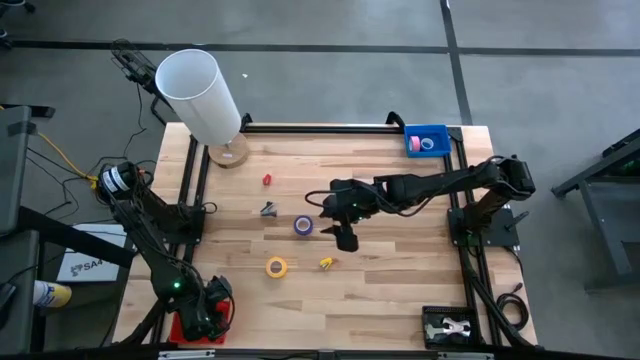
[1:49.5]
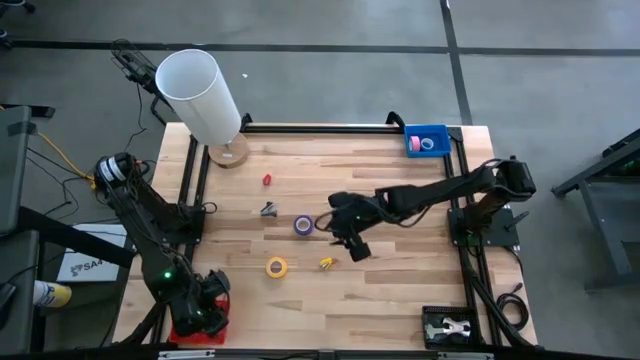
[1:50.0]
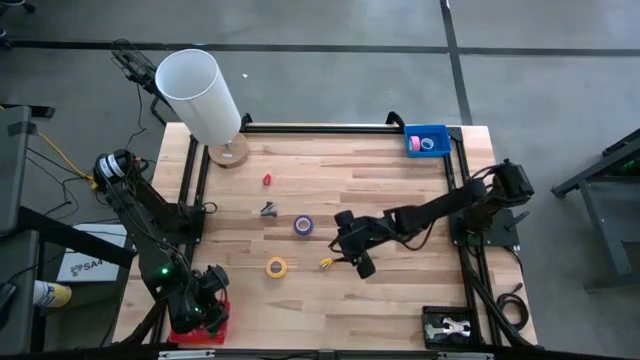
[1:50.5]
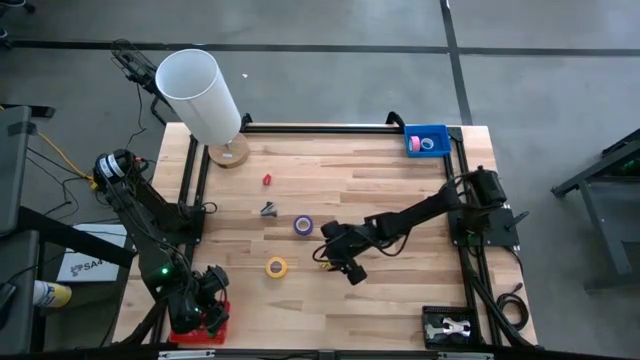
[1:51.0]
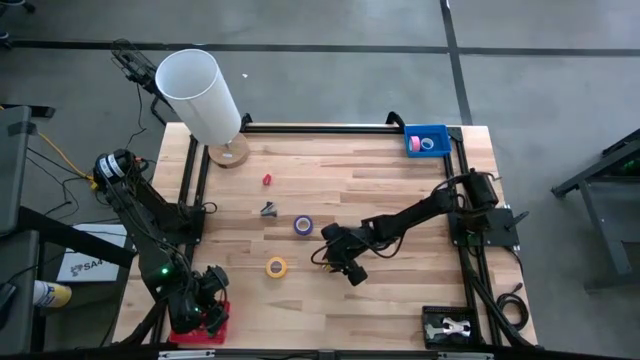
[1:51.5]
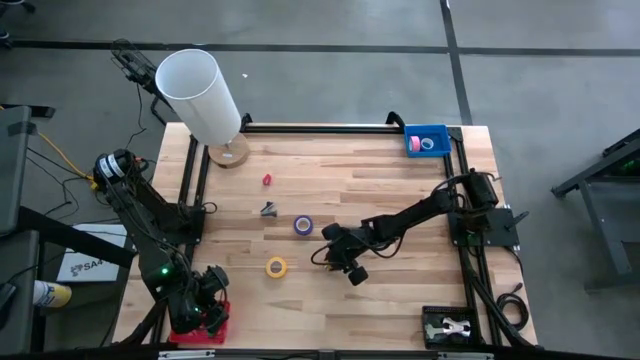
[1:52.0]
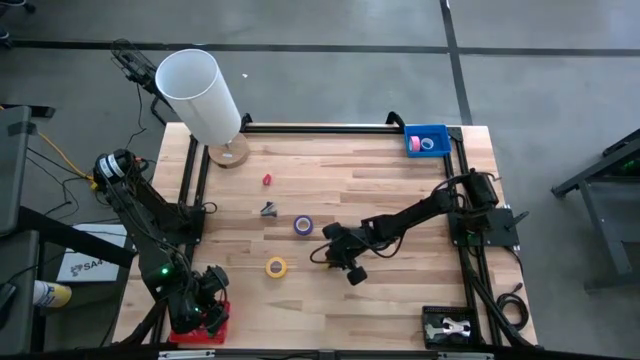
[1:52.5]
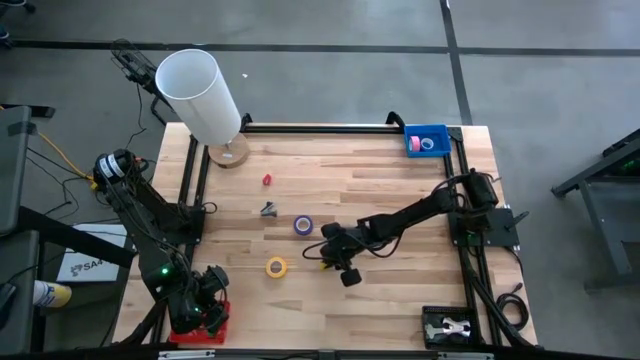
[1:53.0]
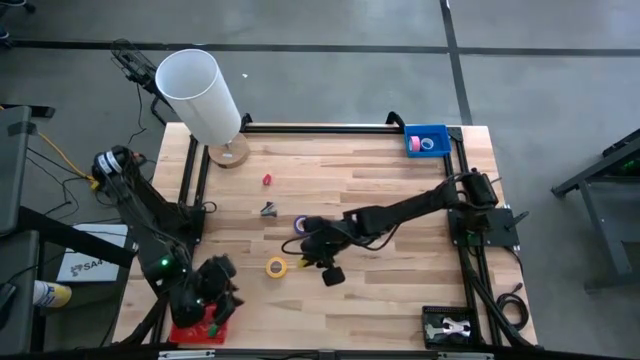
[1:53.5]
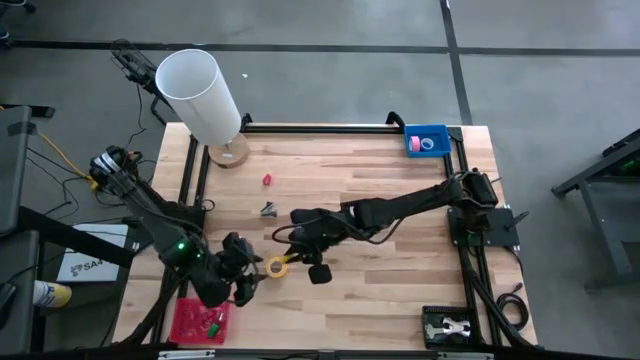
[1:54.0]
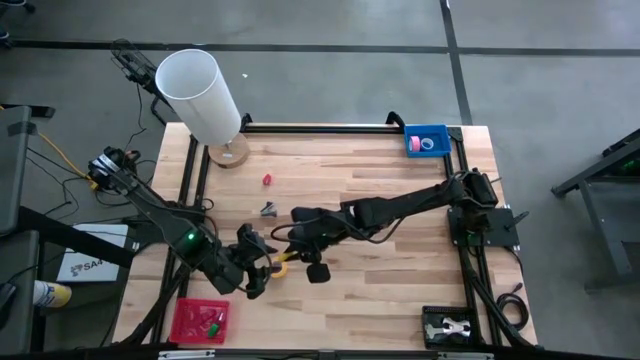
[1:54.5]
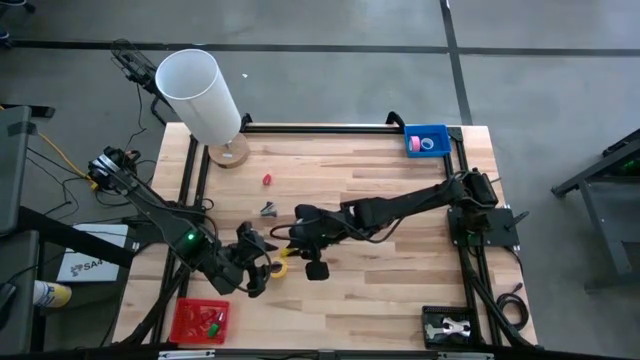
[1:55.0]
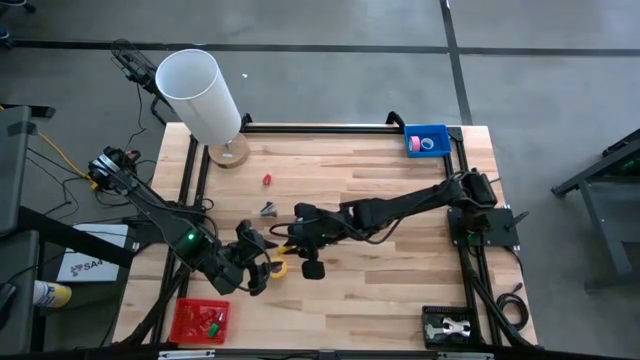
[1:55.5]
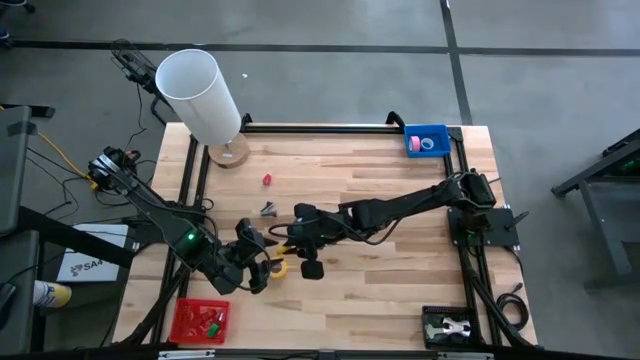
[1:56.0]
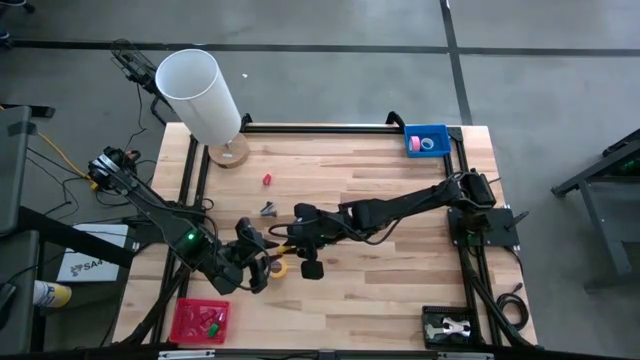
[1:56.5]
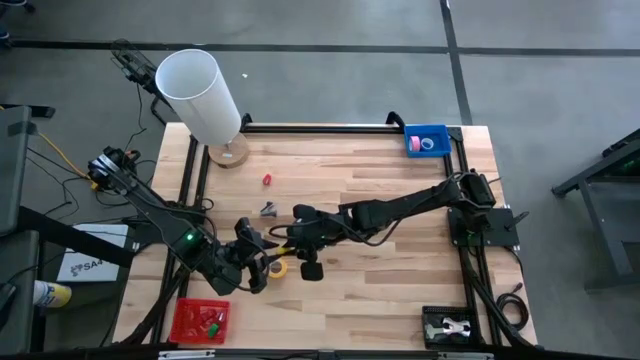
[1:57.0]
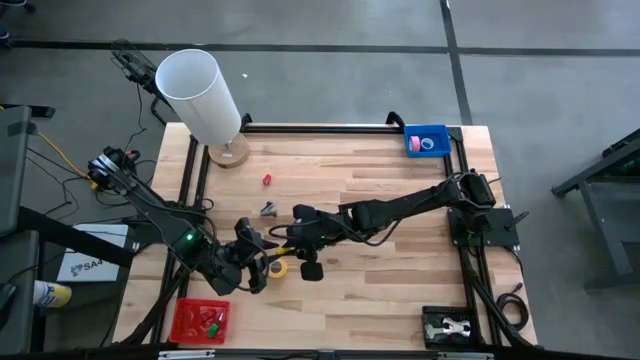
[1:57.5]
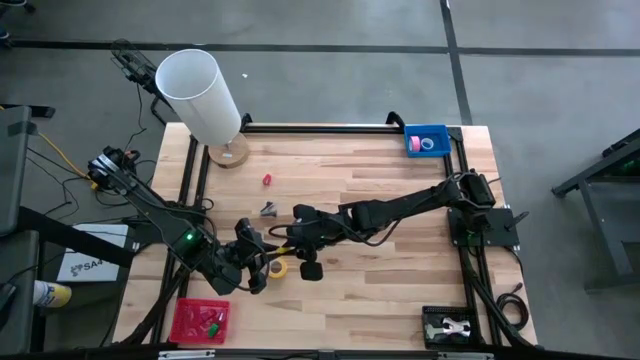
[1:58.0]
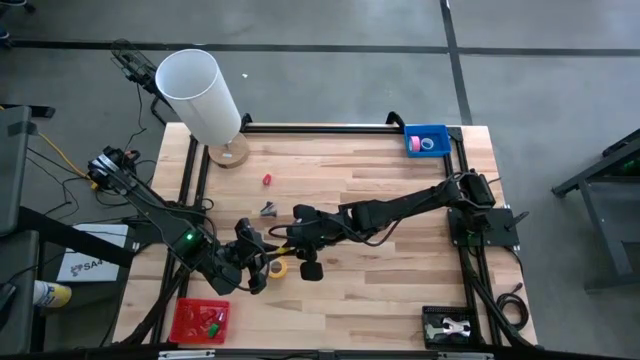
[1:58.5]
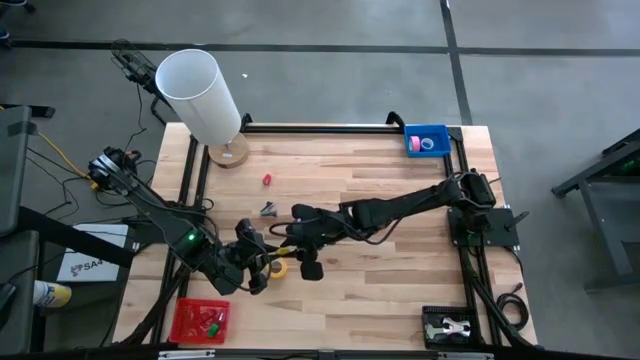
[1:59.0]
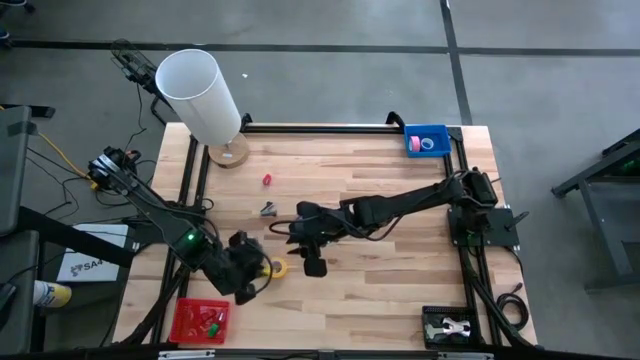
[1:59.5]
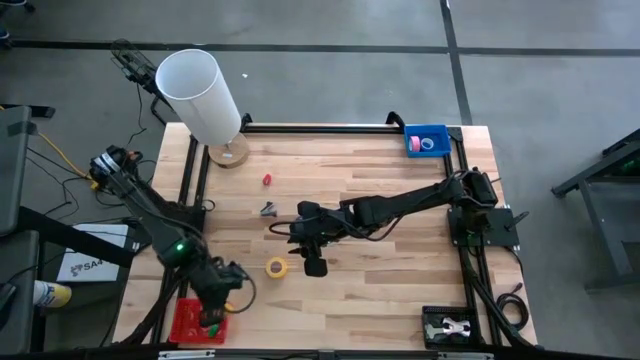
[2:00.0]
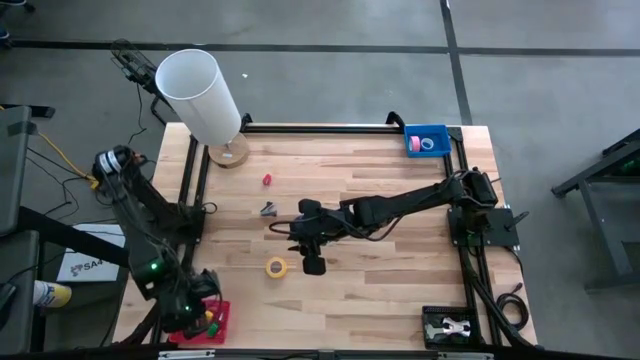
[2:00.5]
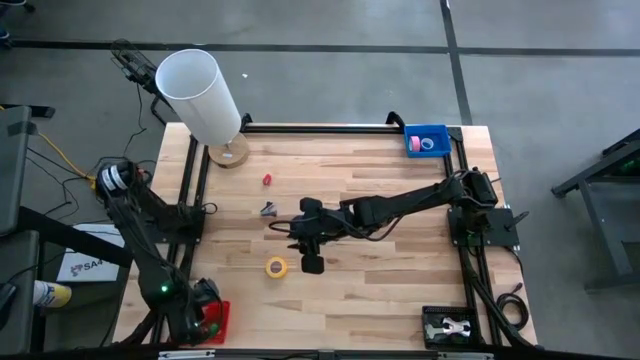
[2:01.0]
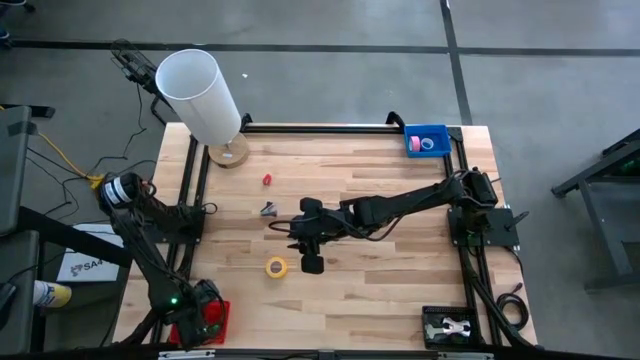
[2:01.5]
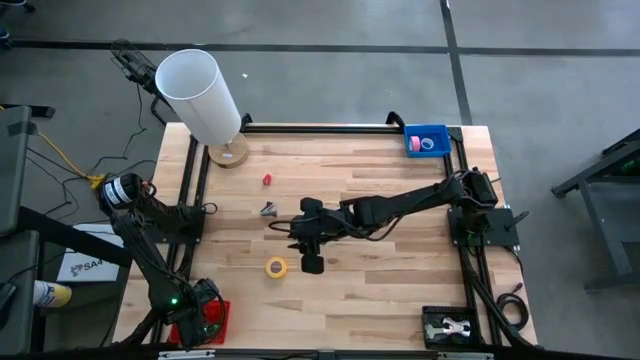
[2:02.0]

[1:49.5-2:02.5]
Task: Pick and place Stapler, Stapler remover, tape
Put the yellow stapler into the red bin

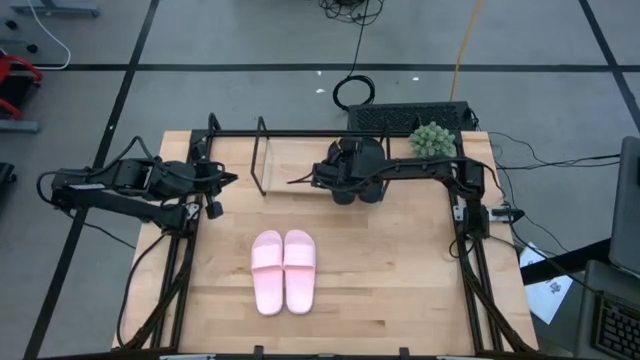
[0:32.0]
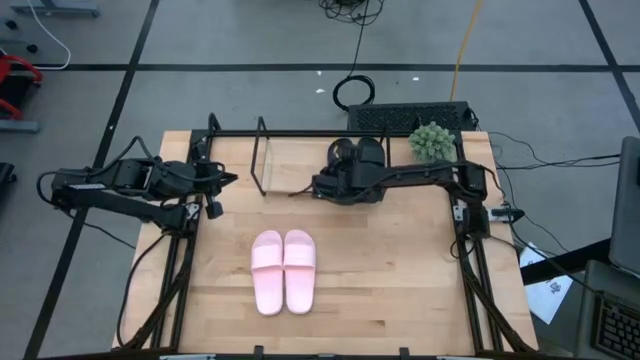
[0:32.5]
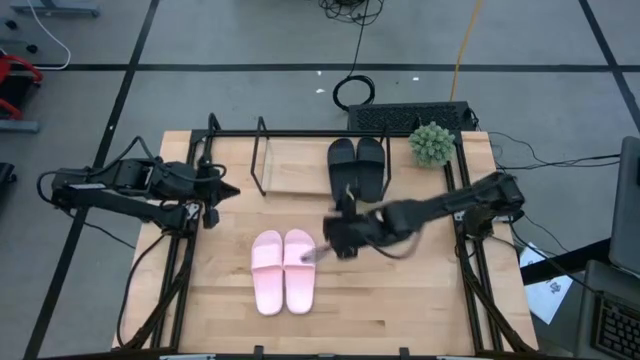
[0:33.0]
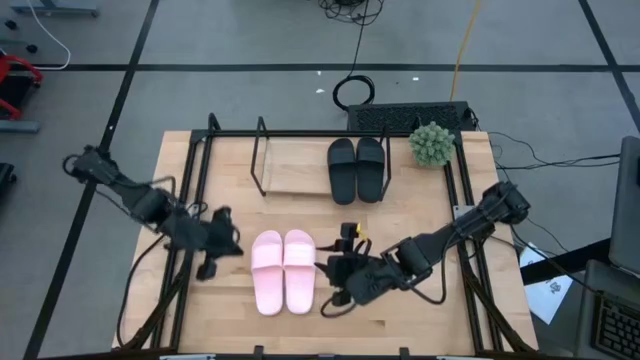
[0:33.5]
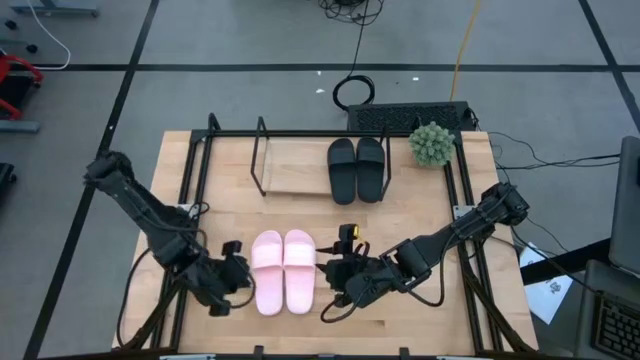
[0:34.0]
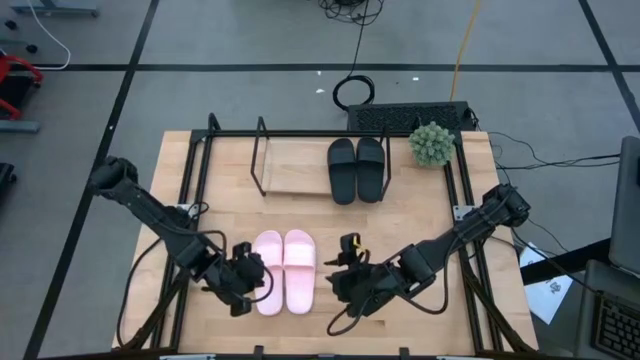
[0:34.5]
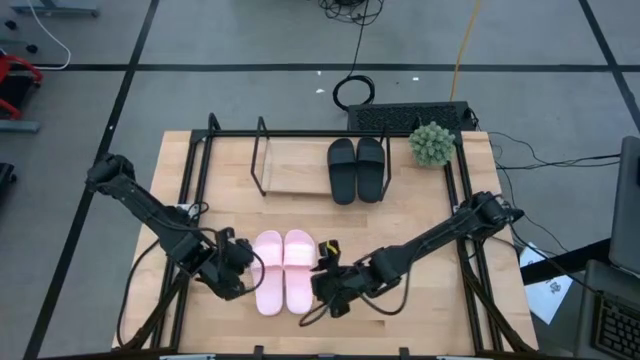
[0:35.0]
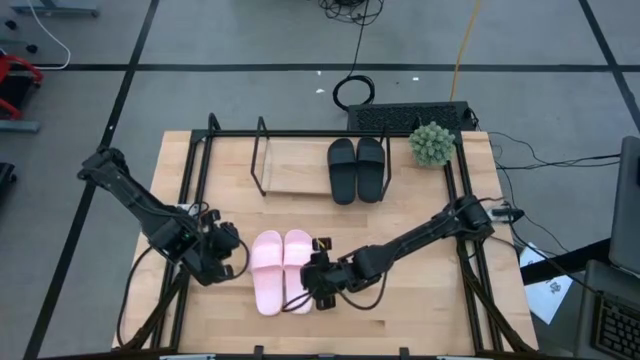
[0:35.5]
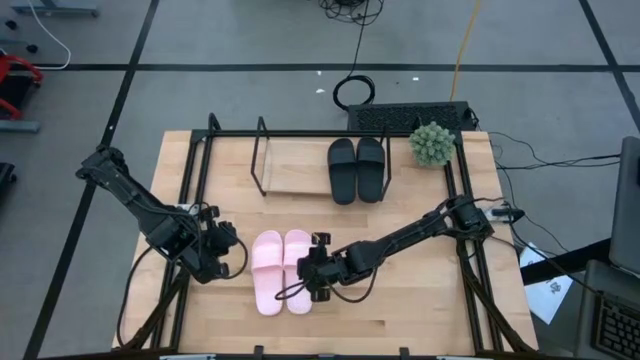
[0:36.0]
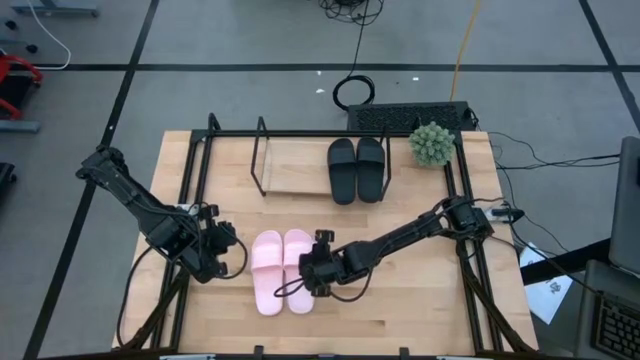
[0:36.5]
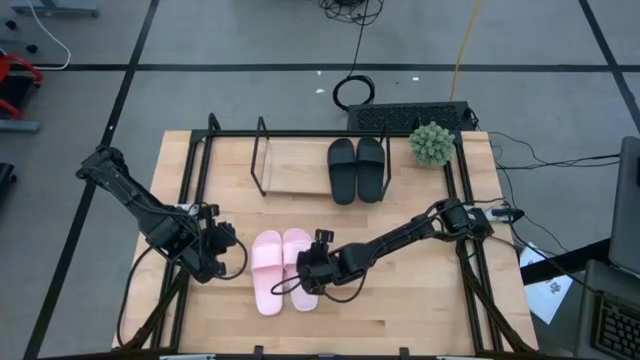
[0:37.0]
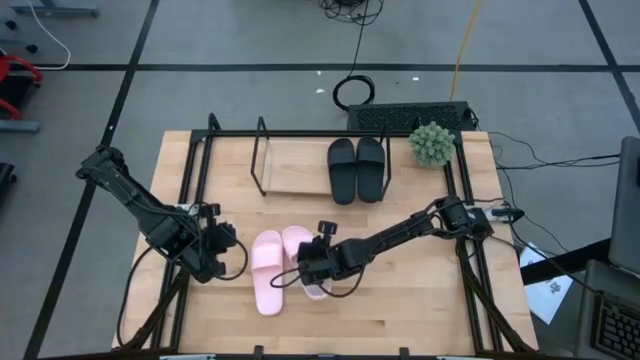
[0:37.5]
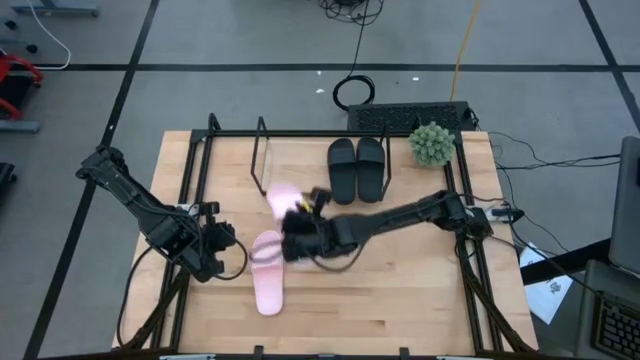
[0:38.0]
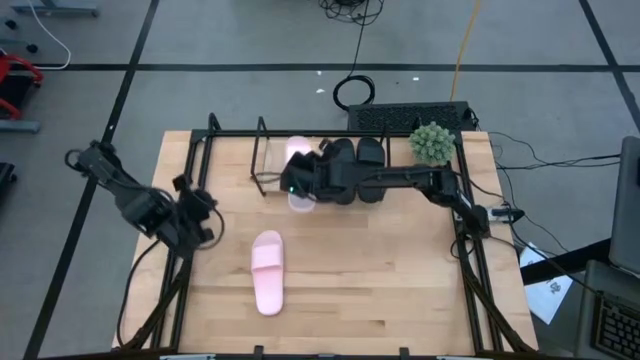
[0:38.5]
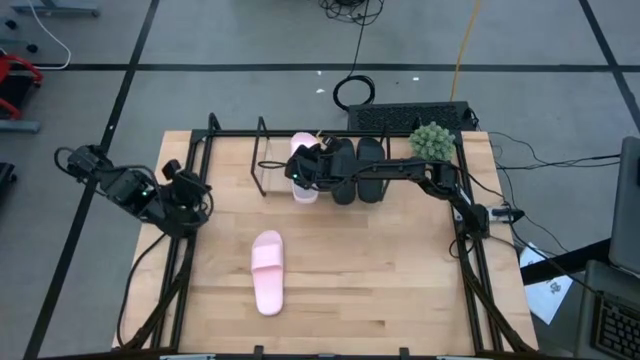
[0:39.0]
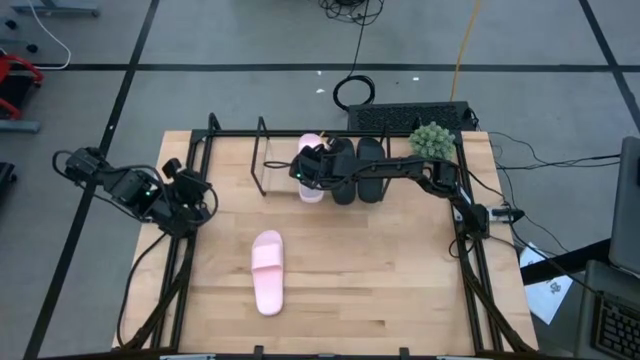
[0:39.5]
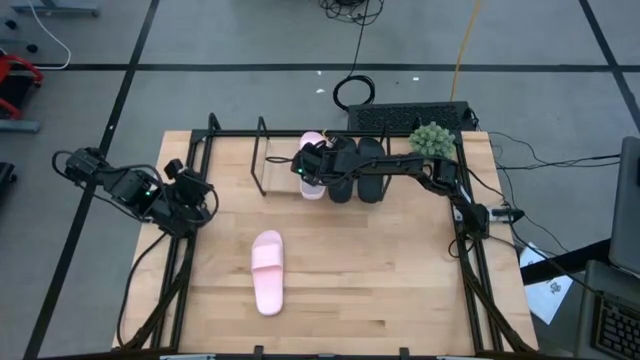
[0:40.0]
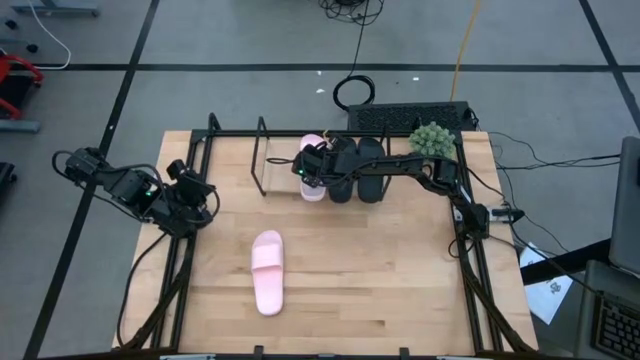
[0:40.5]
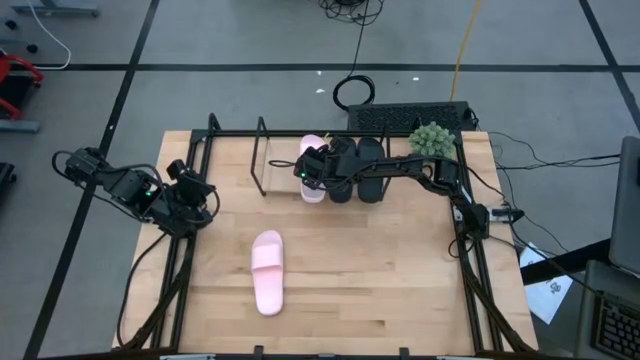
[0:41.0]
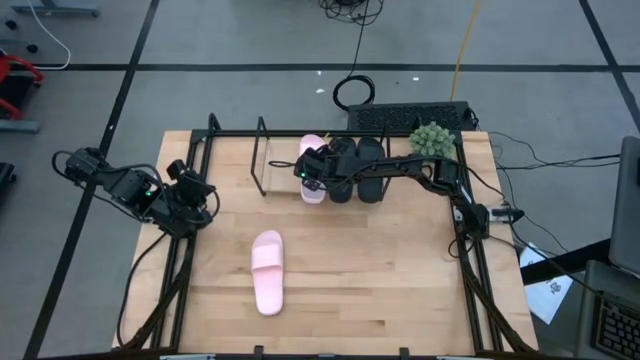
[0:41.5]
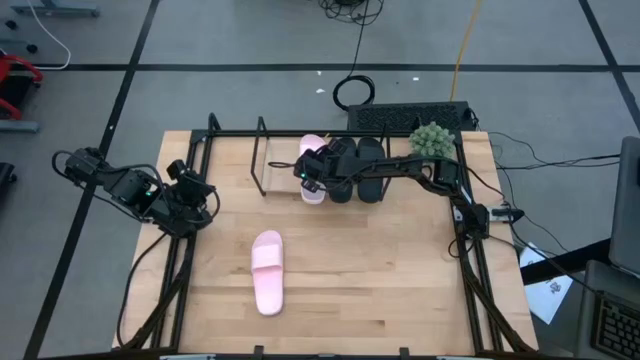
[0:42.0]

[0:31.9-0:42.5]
Task: Pick and place slides into the shelf
Put the right pink slide on the shelf
